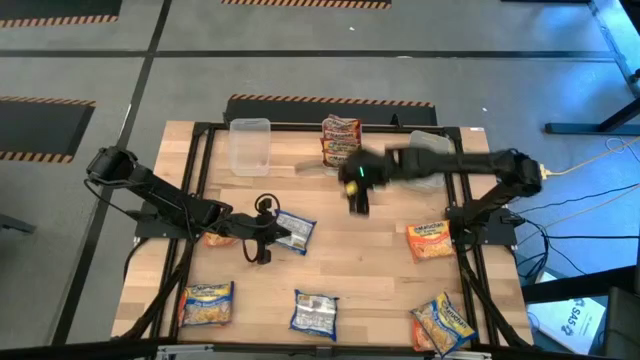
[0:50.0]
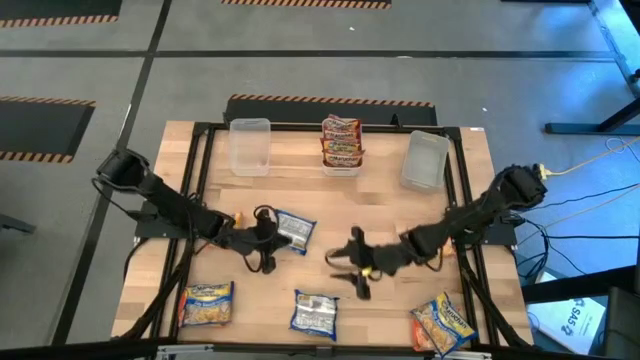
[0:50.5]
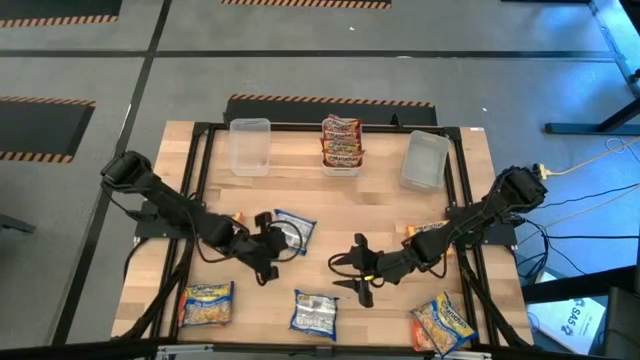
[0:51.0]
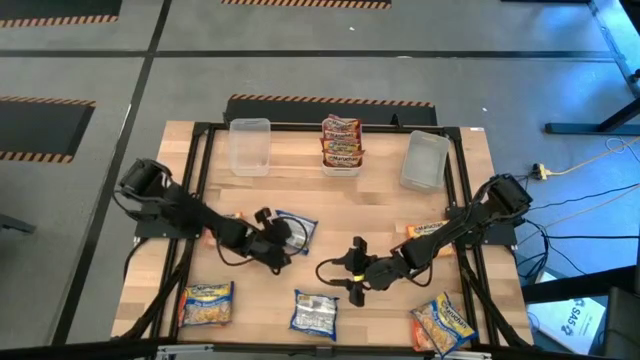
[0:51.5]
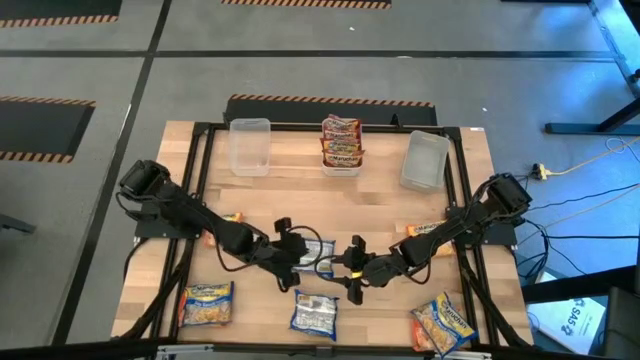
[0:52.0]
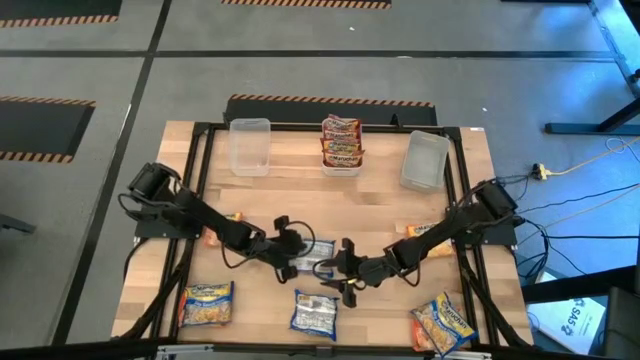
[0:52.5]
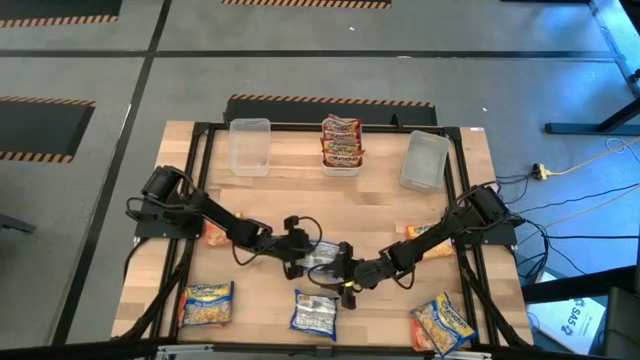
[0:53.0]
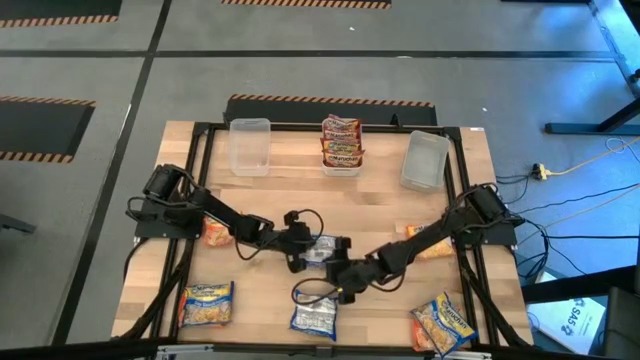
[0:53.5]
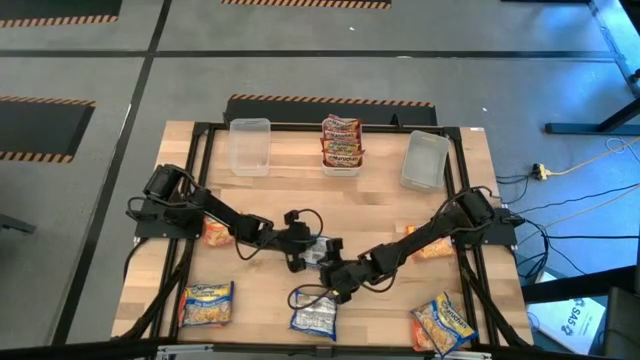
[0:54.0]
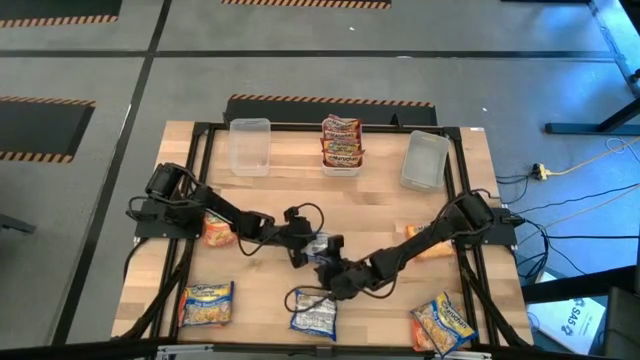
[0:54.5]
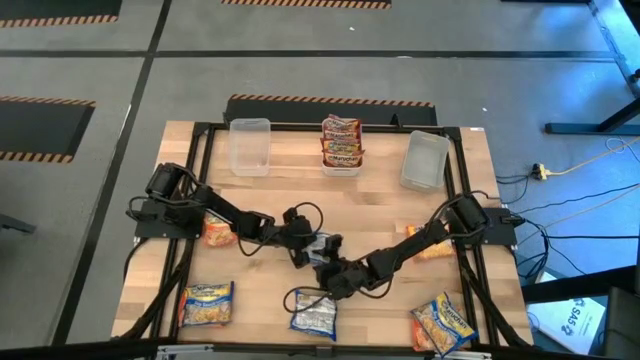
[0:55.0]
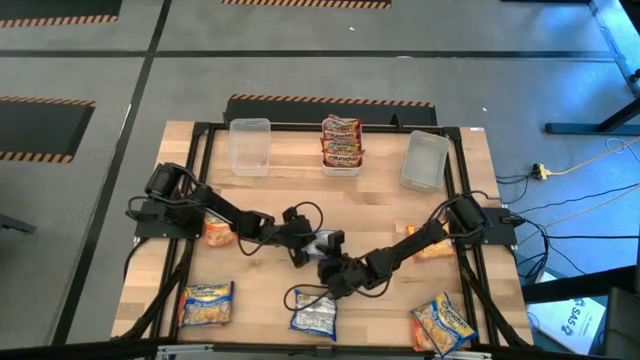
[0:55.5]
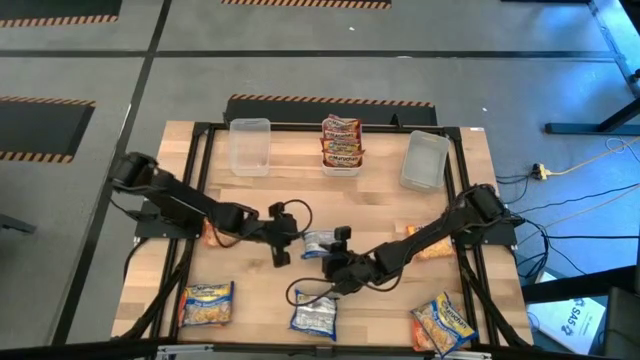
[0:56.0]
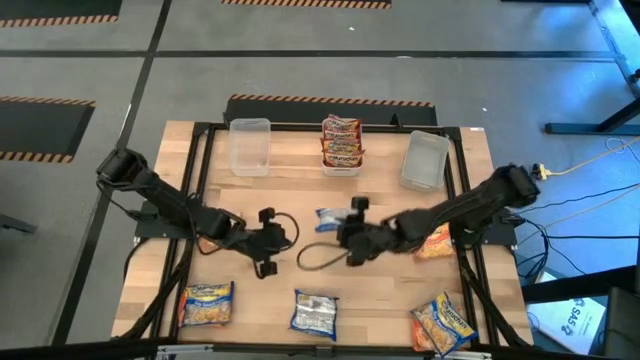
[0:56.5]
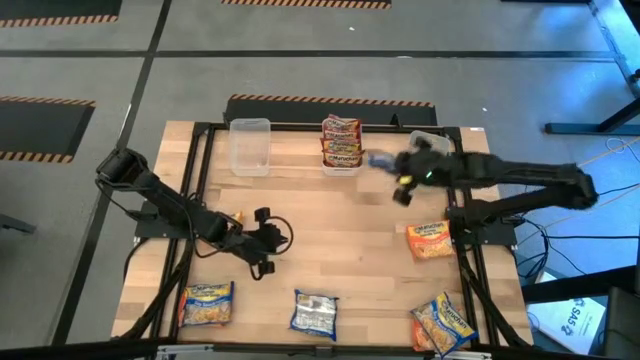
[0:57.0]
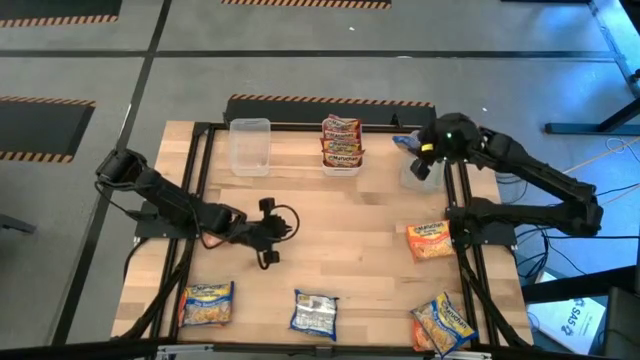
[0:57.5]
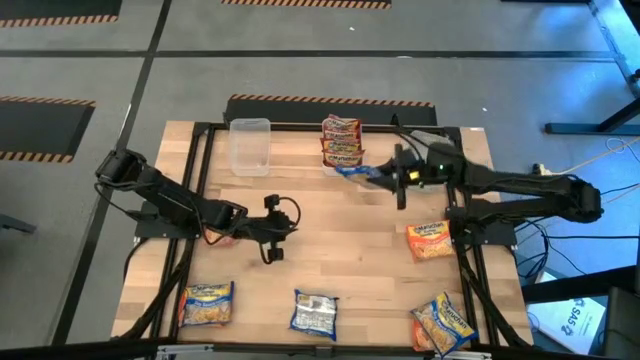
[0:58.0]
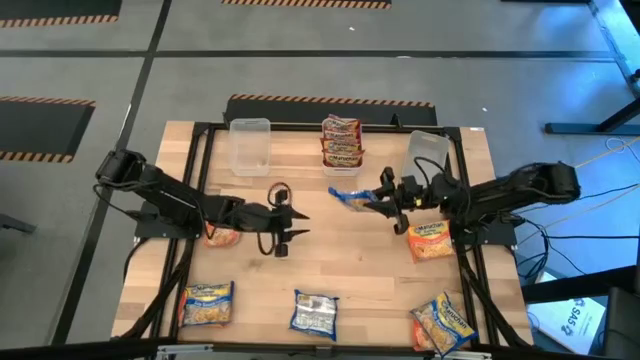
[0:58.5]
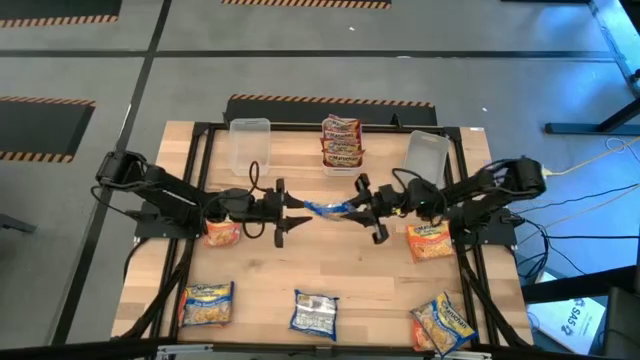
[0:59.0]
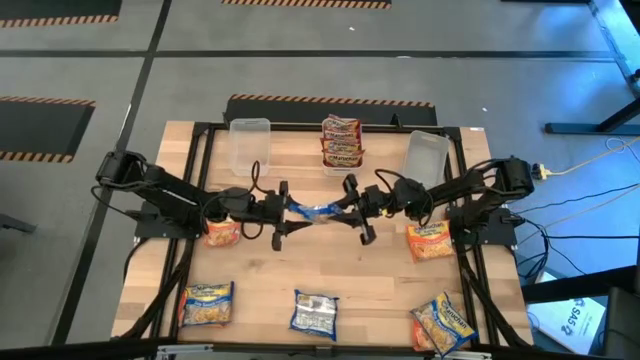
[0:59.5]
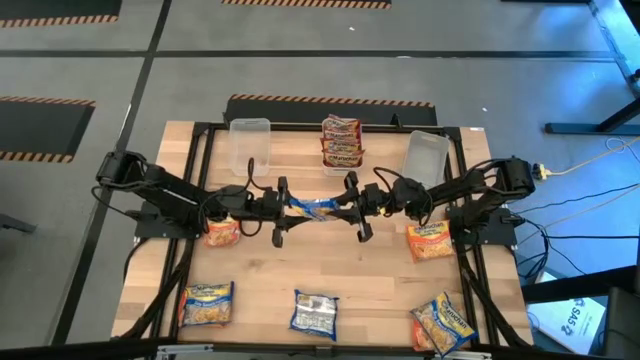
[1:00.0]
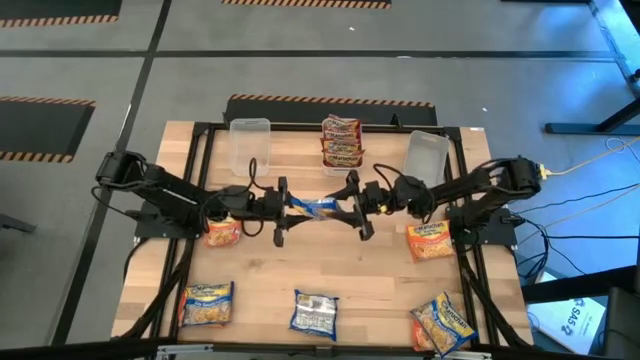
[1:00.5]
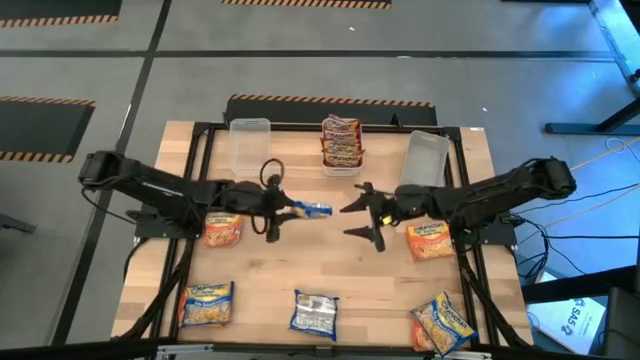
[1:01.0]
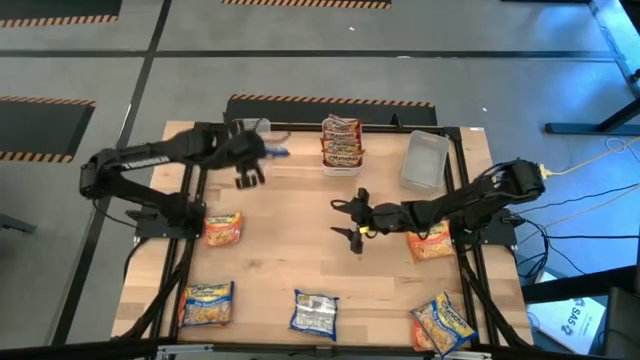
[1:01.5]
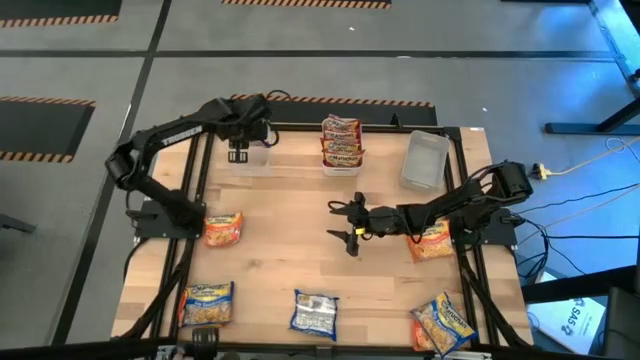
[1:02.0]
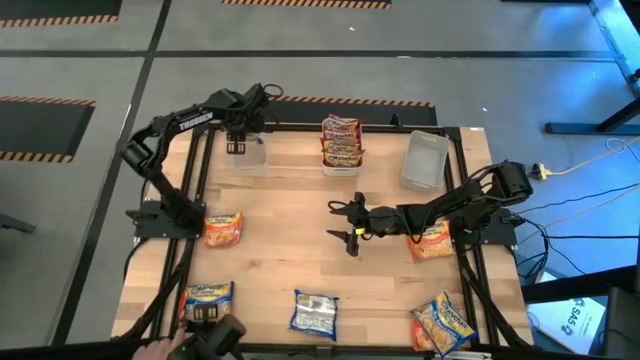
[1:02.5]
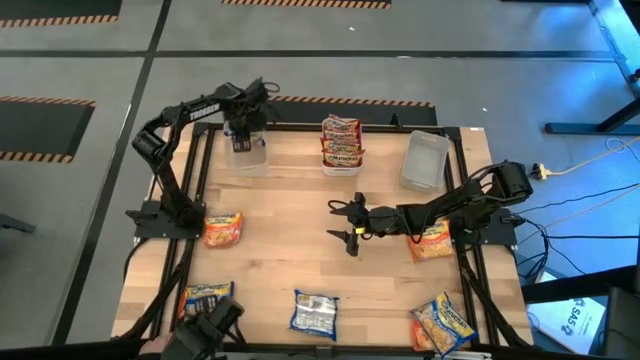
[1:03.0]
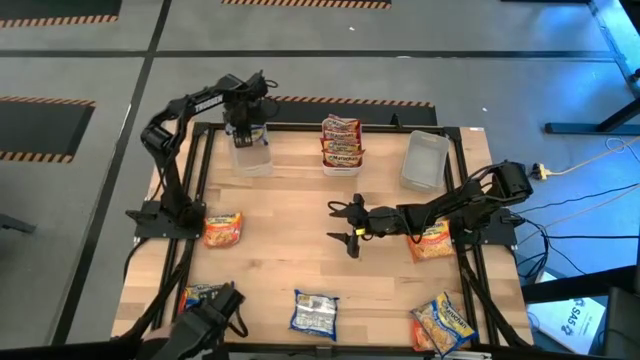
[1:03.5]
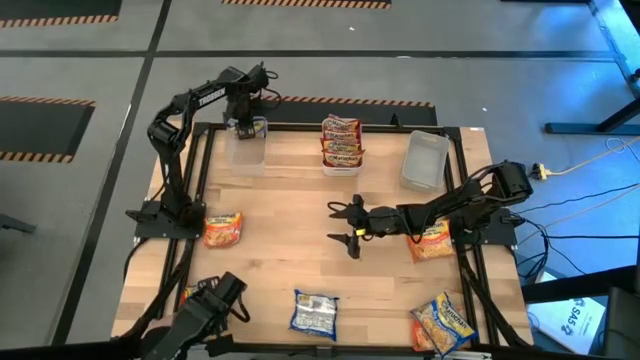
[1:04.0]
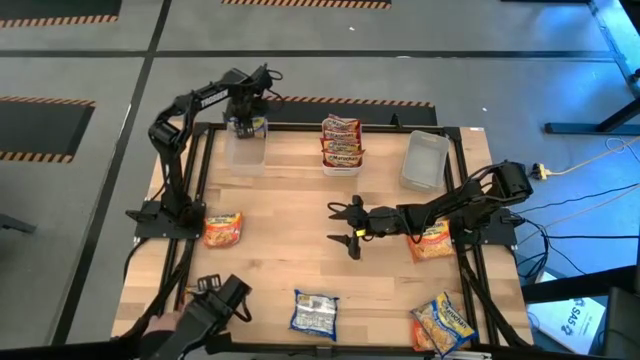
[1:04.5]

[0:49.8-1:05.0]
Task: Sort Maruchan noodles
Put the blue noodle pack into the transparent bin

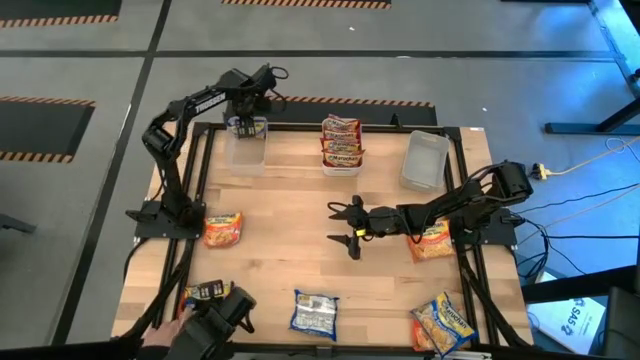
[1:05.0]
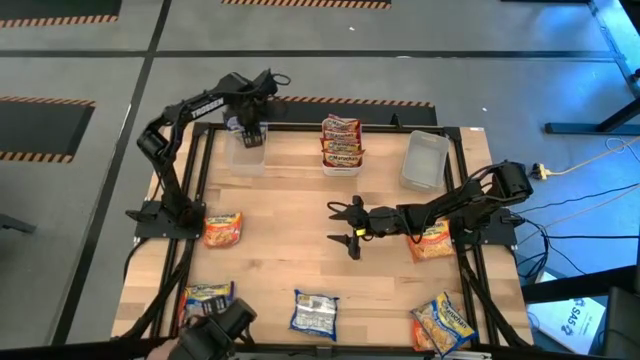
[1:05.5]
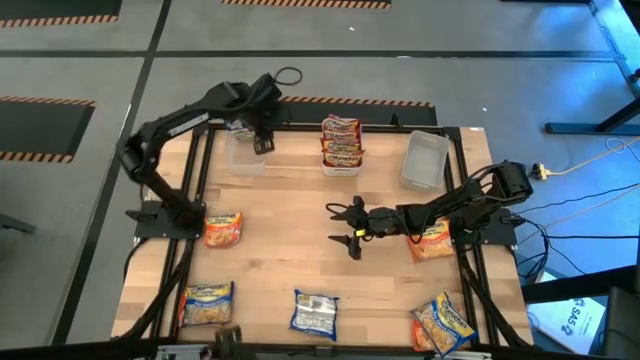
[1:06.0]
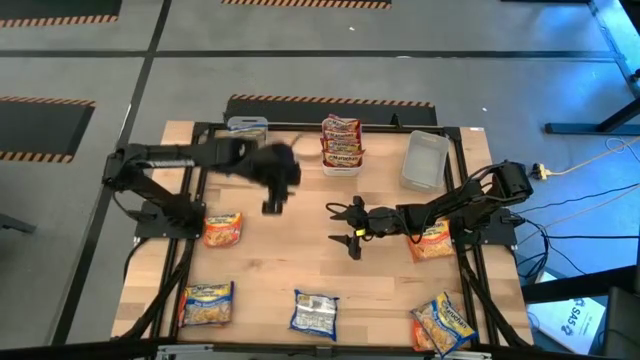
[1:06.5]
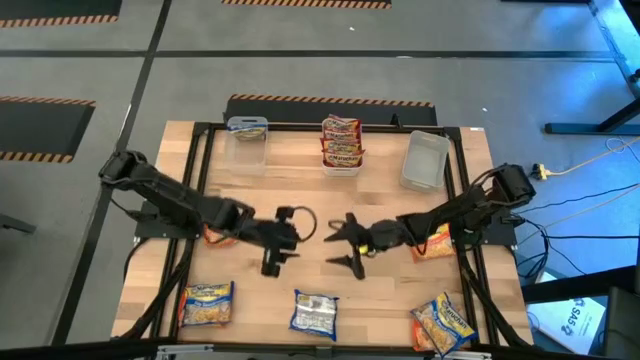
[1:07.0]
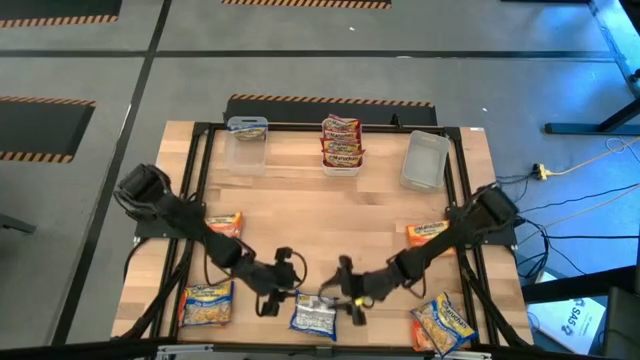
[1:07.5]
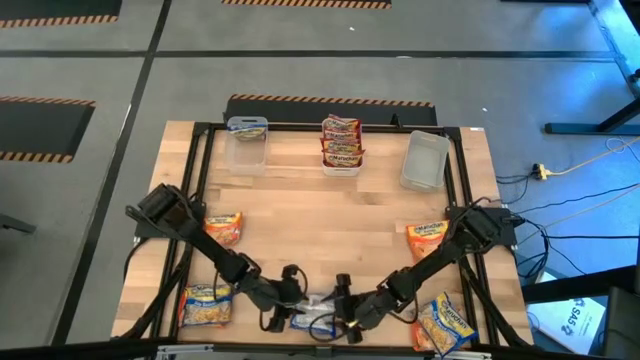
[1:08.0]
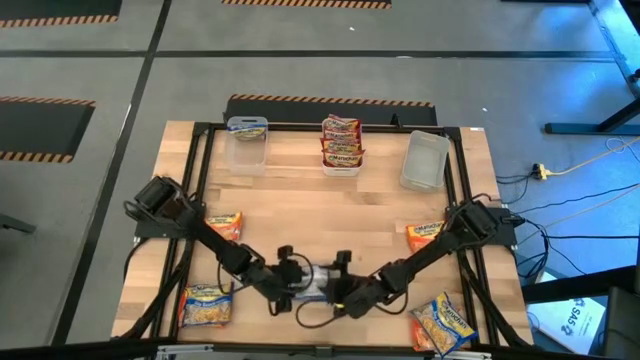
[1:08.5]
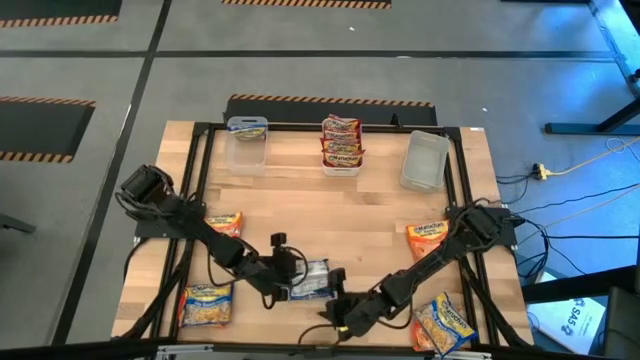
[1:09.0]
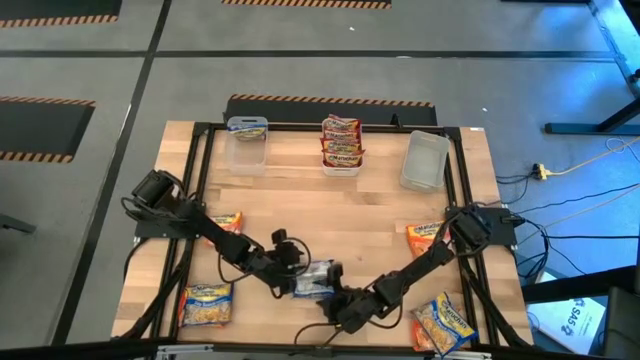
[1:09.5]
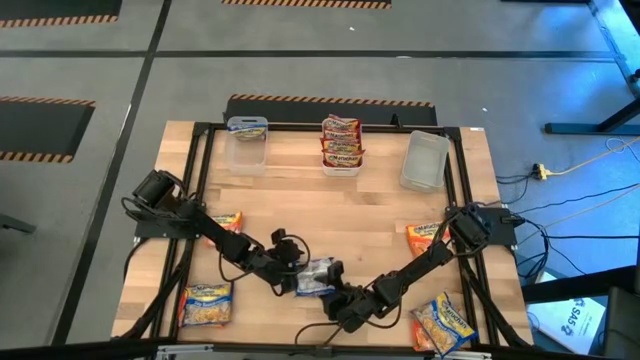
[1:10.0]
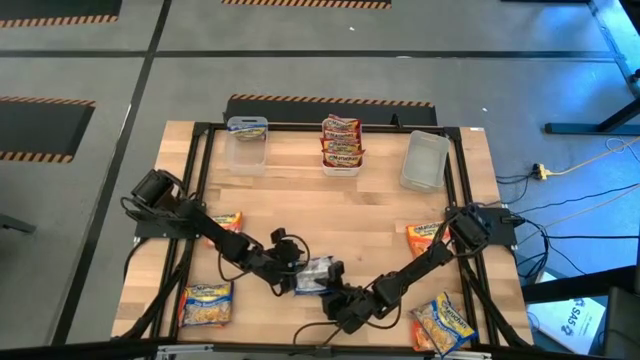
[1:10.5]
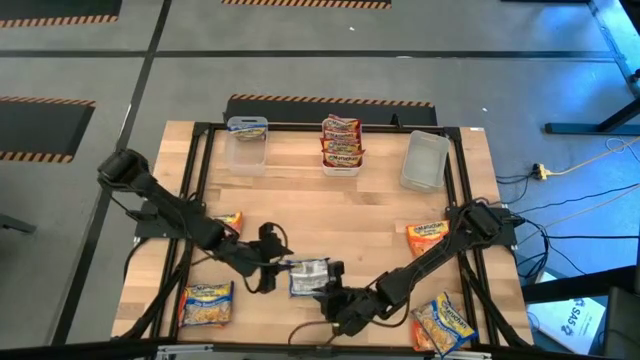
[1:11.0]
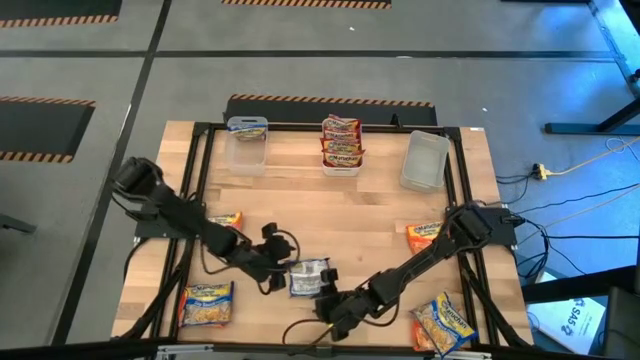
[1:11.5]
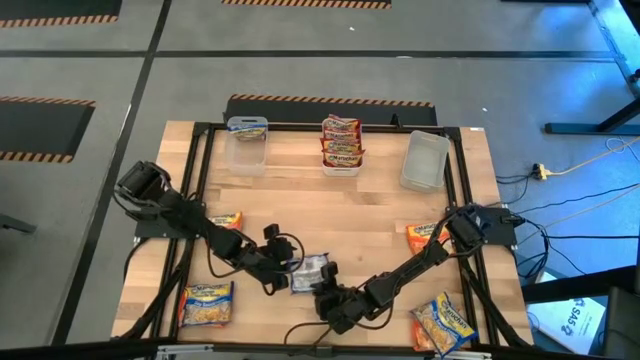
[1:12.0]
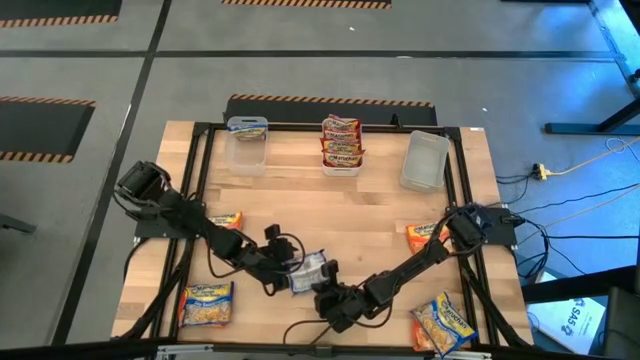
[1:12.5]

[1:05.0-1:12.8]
Put the blue noodle pack into the transparent bin
